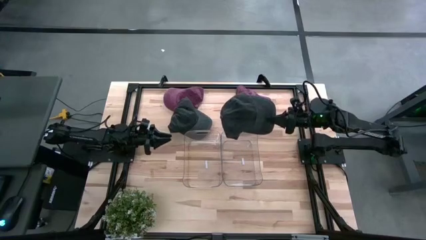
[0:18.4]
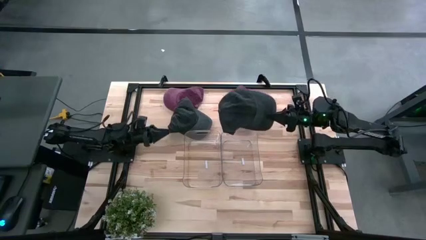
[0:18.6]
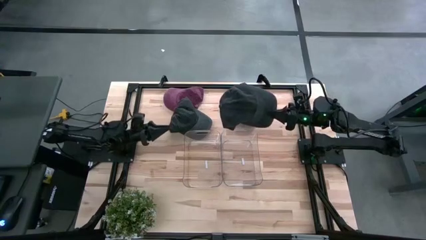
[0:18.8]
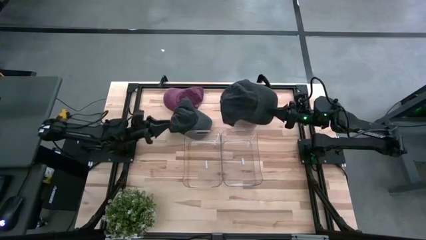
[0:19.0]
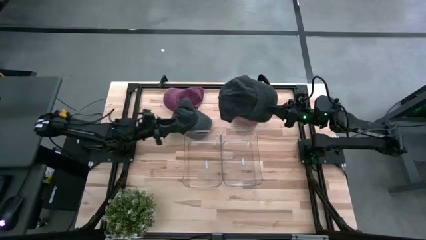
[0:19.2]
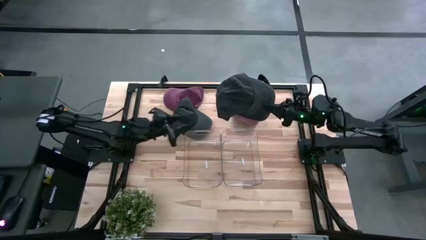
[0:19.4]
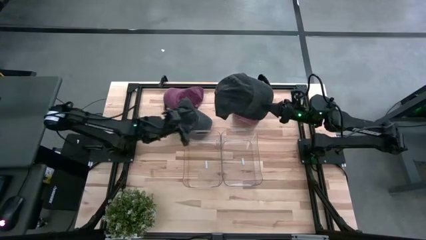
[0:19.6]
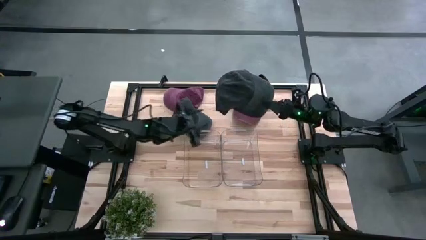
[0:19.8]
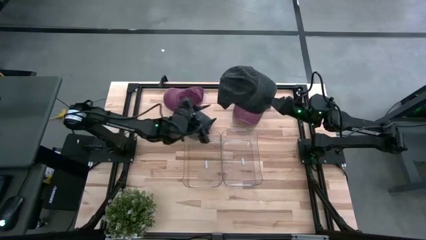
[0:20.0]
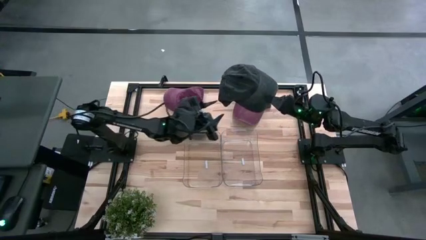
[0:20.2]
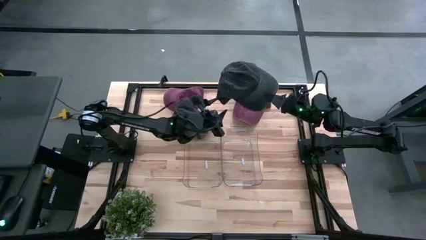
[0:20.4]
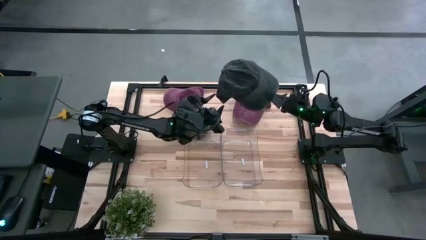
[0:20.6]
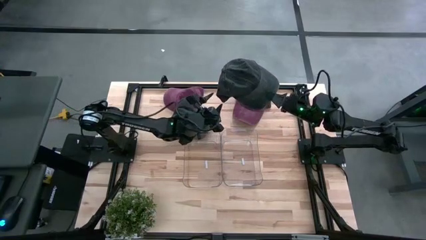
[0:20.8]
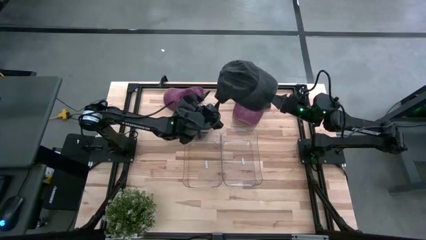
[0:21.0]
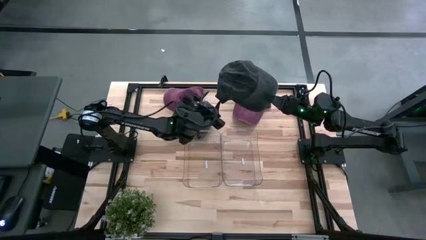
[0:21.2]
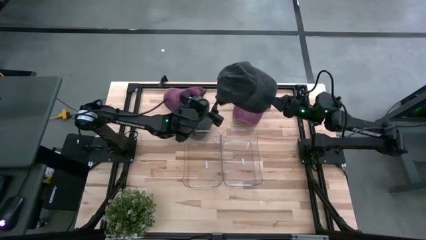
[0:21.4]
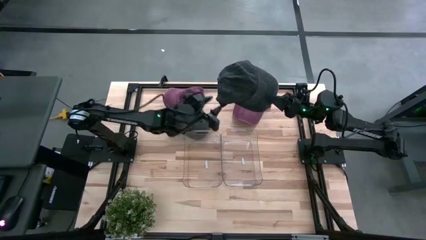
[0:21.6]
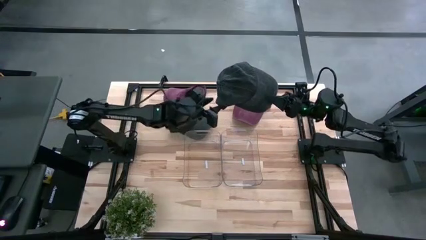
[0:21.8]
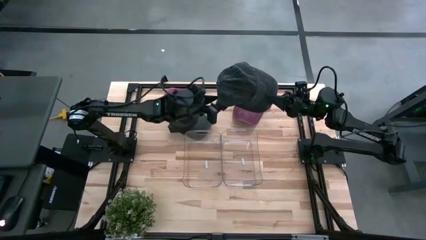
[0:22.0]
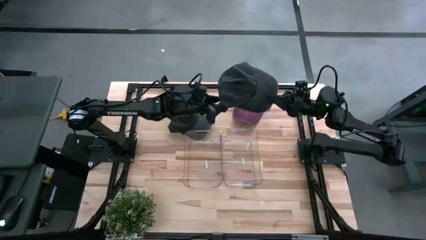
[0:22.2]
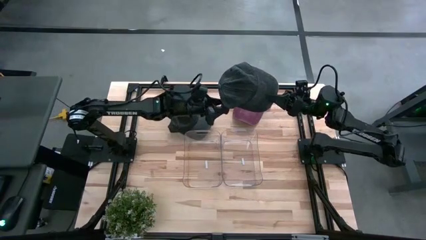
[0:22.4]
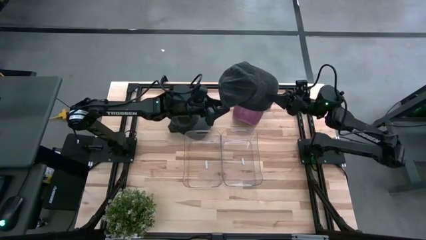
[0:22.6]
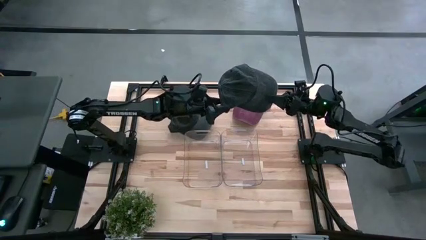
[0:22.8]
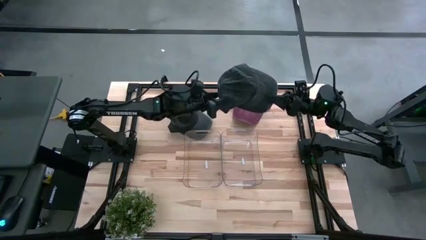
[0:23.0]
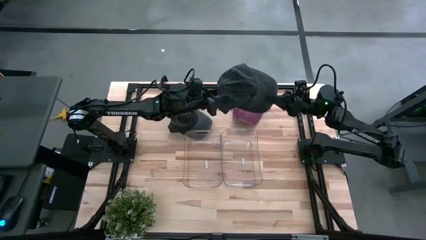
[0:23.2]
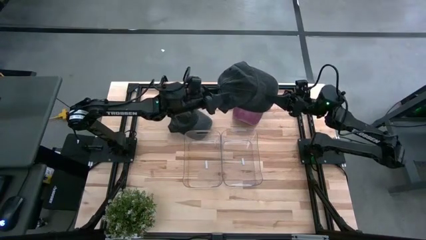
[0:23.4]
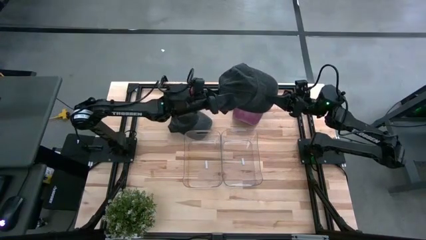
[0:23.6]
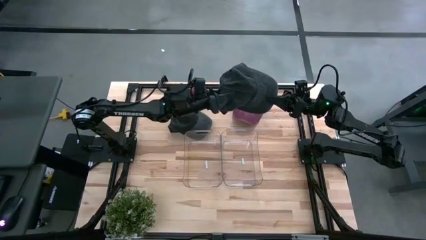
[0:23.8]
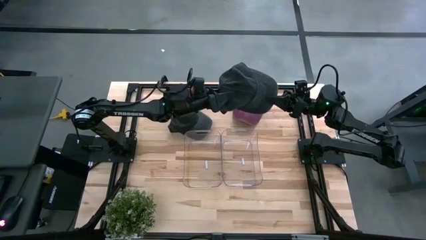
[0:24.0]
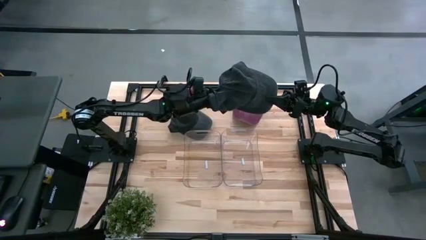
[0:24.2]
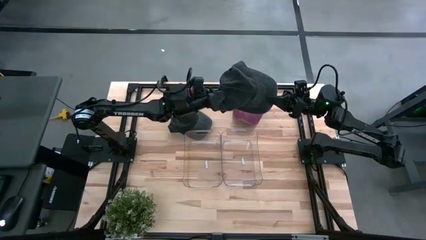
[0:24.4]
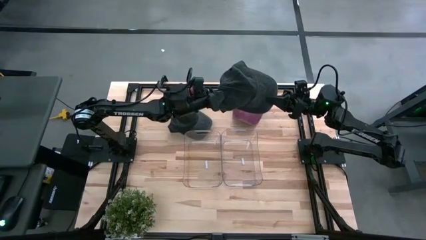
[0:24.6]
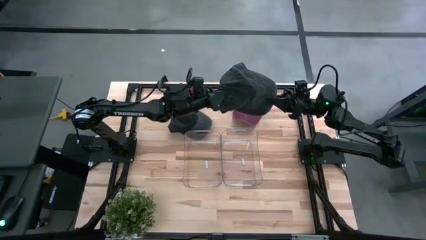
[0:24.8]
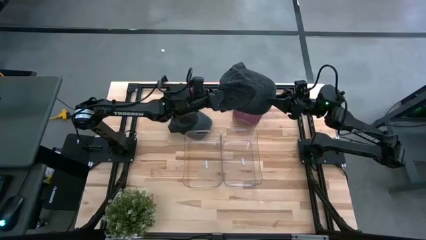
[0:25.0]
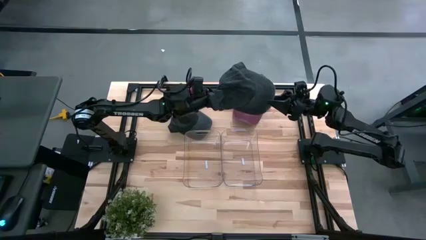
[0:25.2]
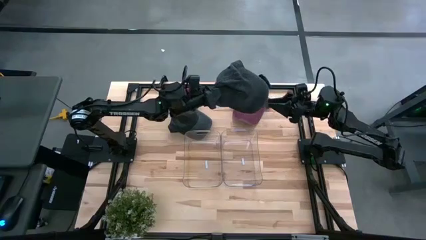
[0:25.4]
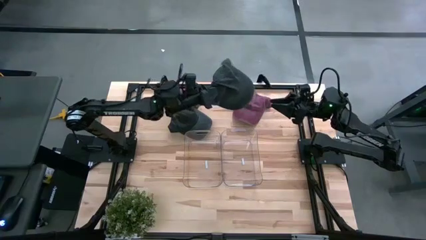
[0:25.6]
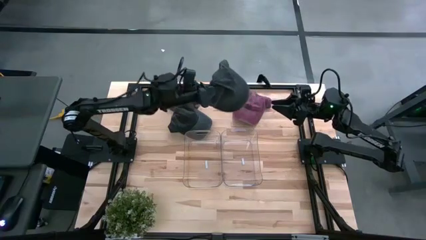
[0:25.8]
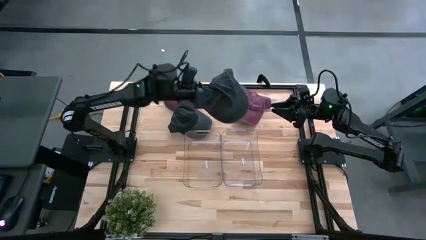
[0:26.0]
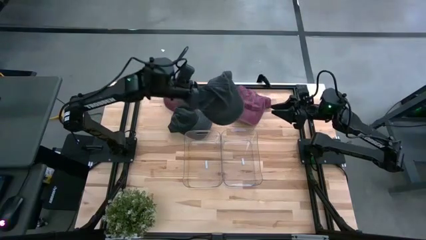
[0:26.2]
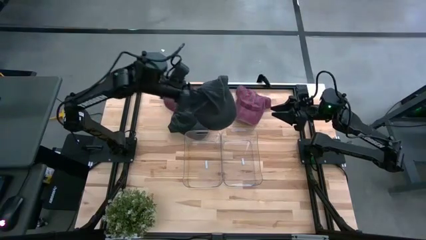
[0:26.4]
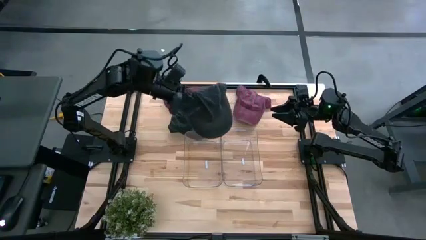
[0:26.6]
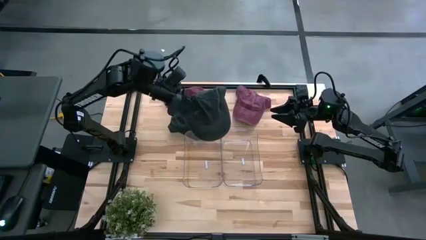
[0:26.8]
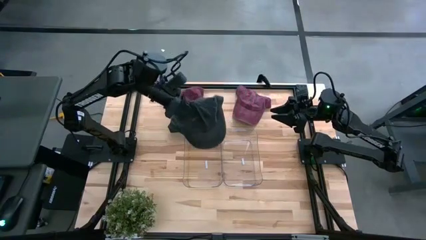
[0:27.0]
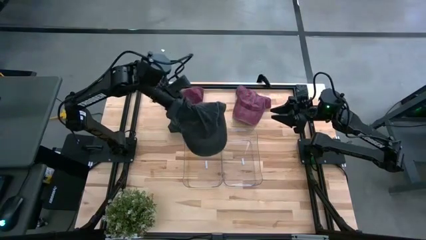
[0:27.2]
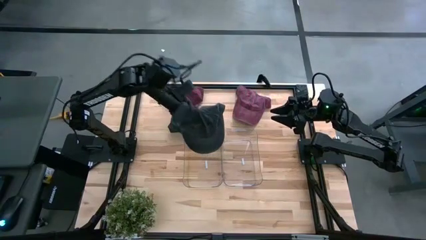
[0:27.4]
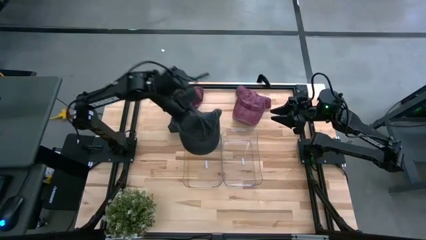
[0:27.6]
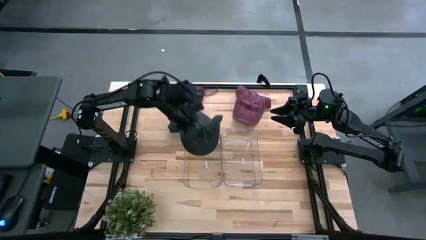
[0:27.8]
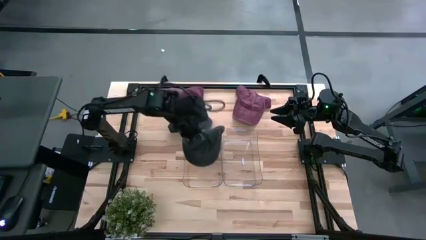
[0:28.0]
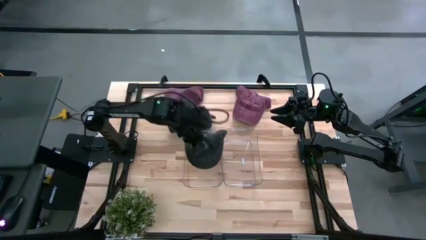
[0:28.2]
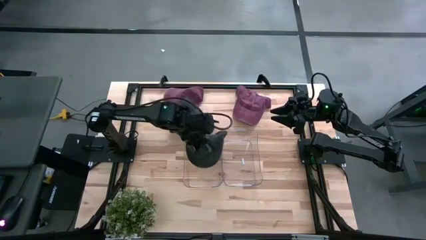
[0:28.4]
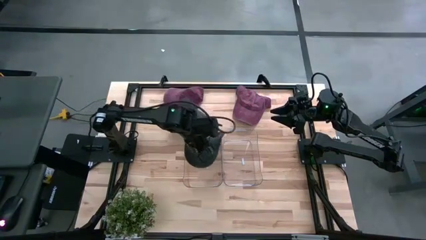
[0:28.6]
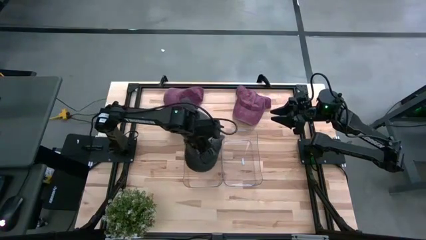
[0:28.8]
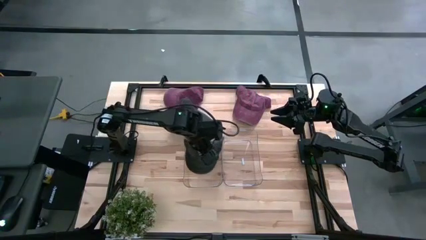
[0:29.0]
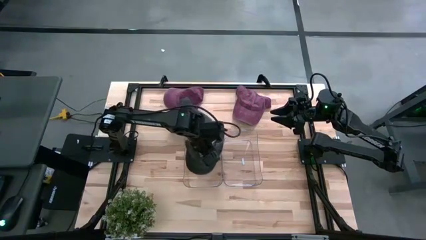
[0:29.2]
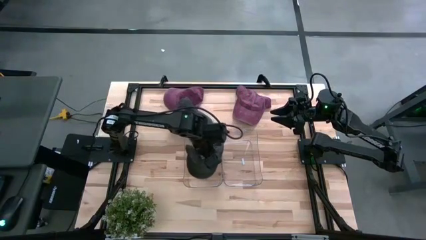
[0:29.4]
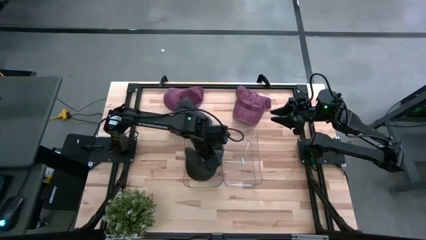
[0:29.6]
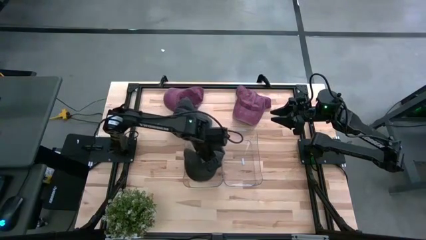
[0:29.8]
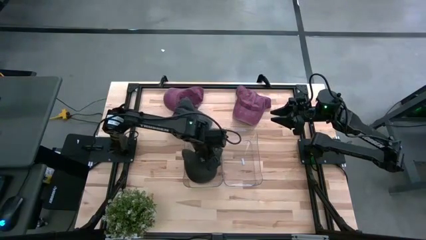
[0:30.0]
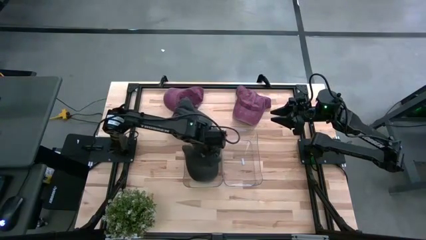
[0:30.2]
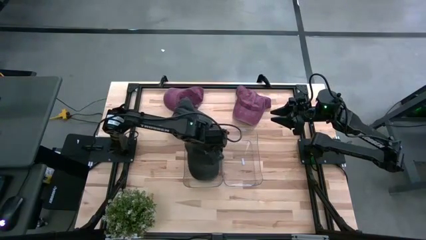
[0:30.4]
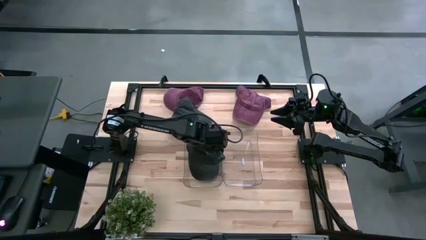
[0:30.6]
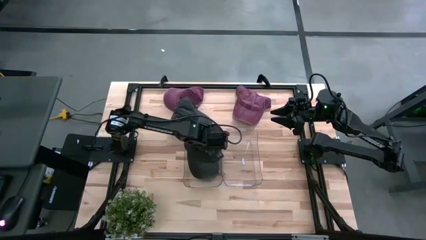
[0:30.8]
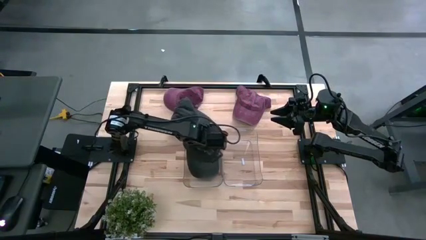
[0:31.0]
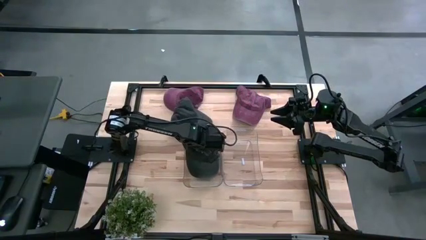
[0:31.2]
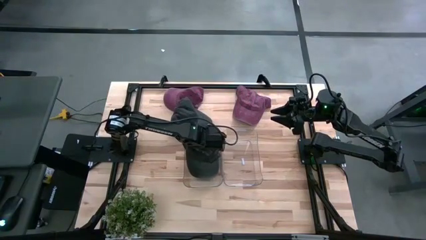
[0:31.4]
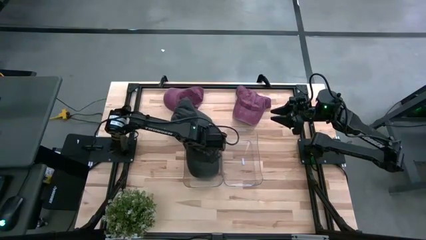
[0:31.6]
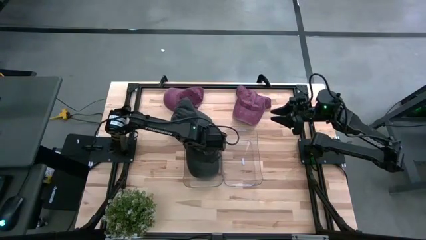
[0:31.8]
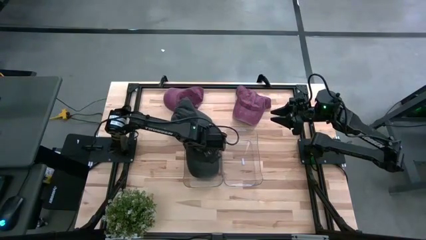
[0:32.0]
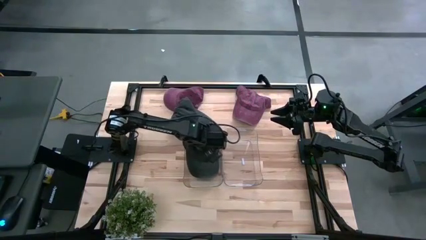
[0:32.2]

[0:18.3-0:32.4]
Task: Pick & Place hat
Put the right black cap into the left transparent bin
